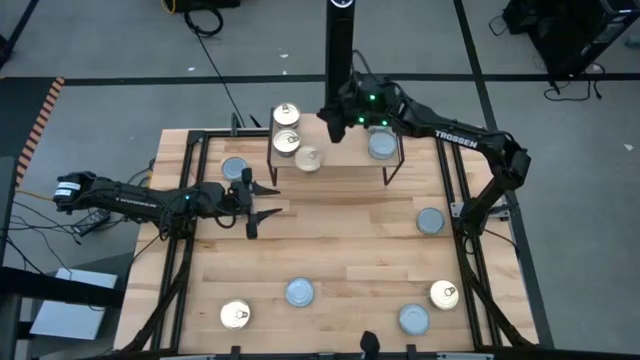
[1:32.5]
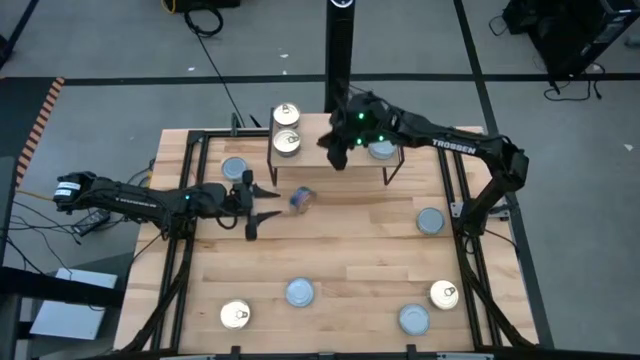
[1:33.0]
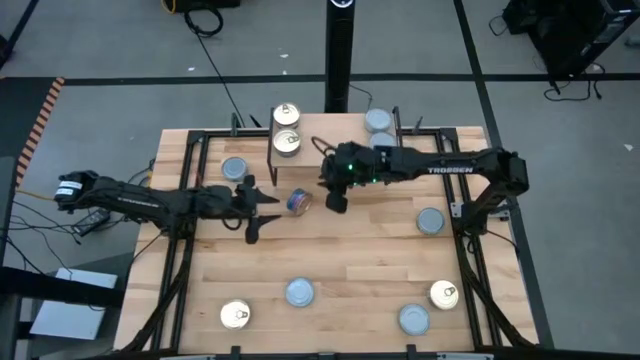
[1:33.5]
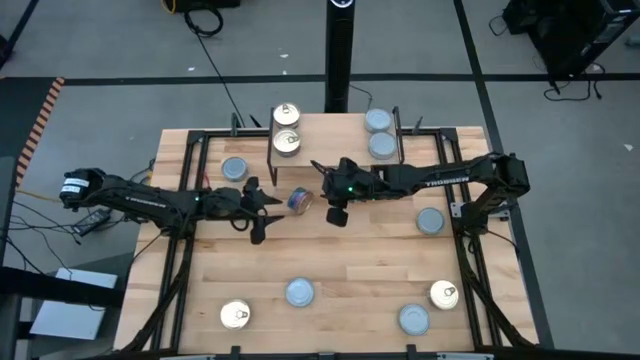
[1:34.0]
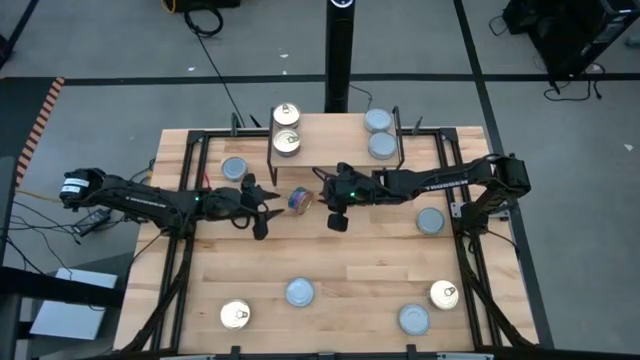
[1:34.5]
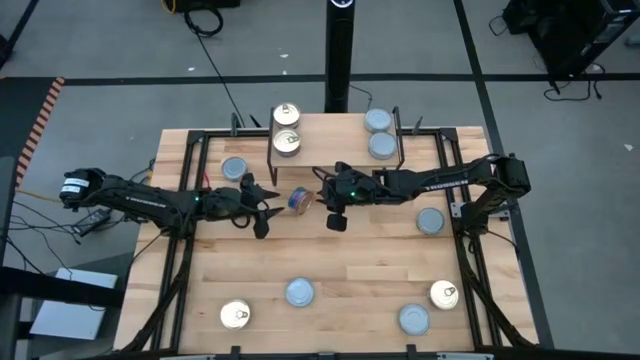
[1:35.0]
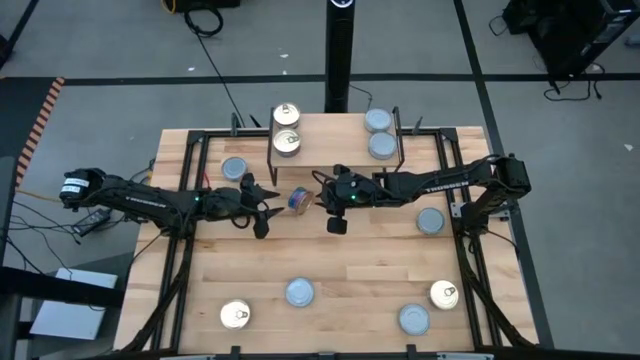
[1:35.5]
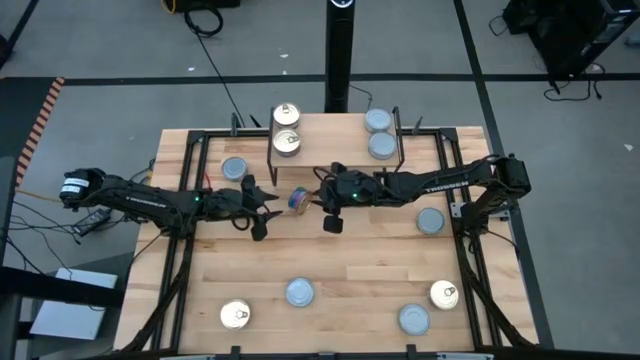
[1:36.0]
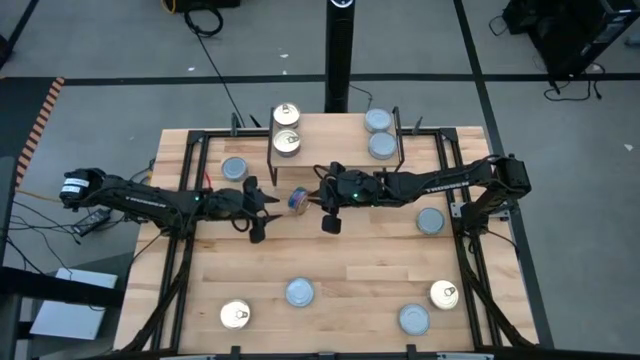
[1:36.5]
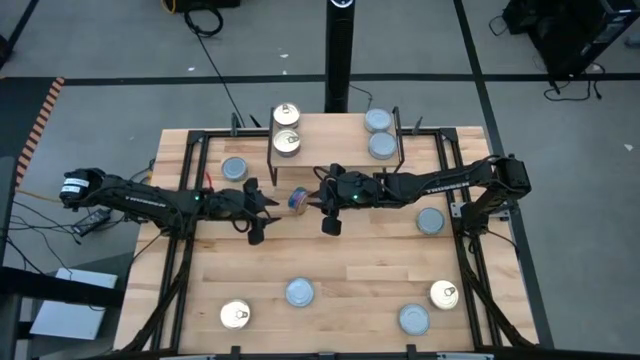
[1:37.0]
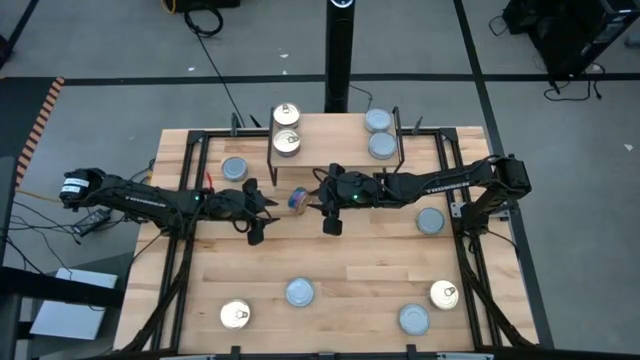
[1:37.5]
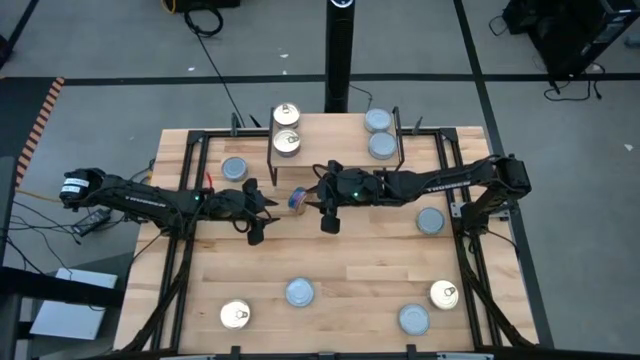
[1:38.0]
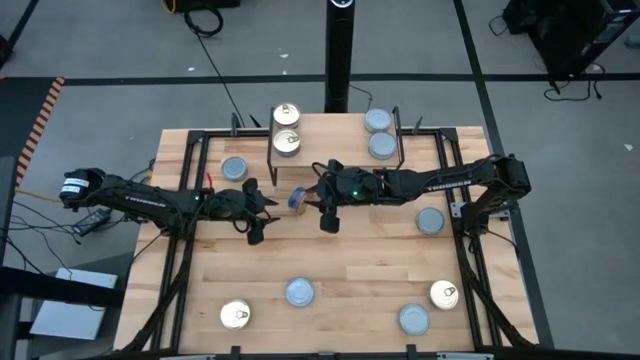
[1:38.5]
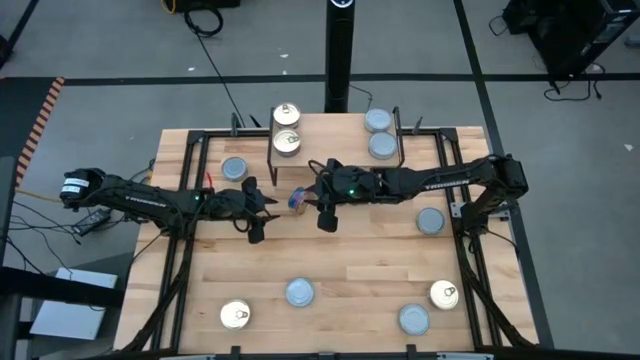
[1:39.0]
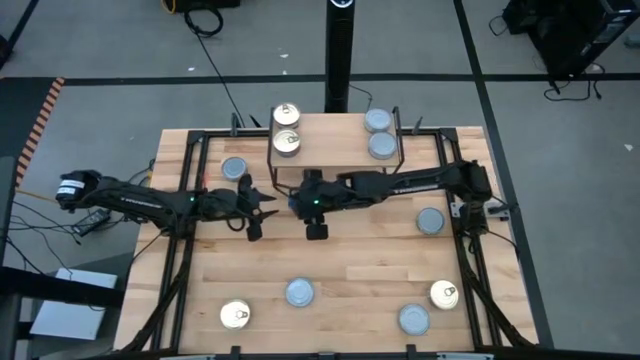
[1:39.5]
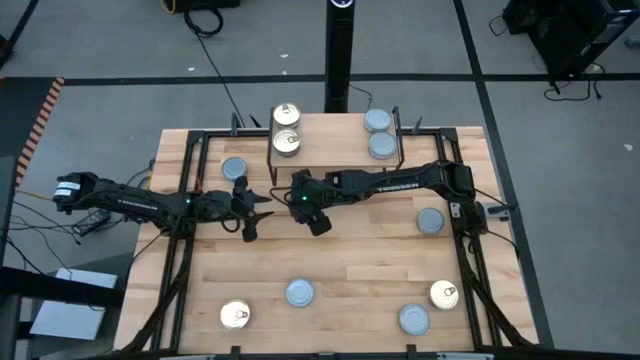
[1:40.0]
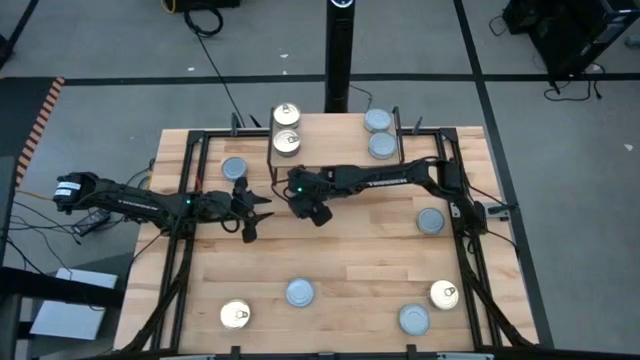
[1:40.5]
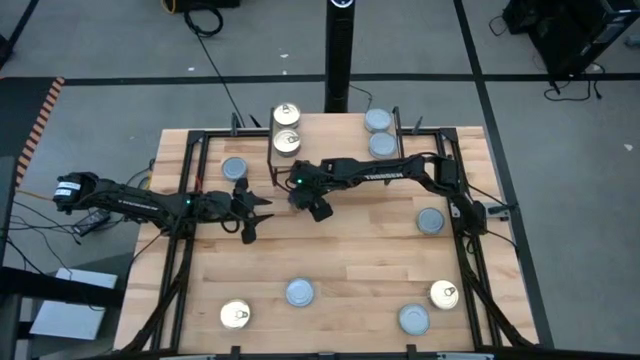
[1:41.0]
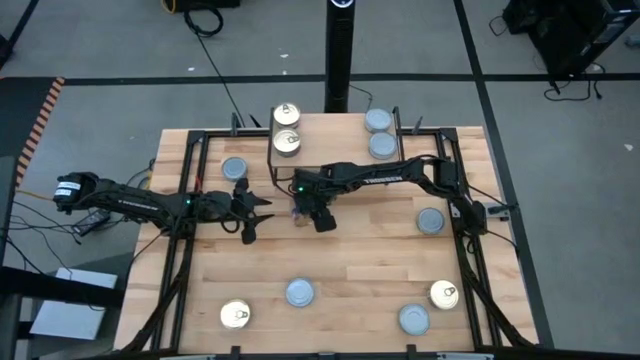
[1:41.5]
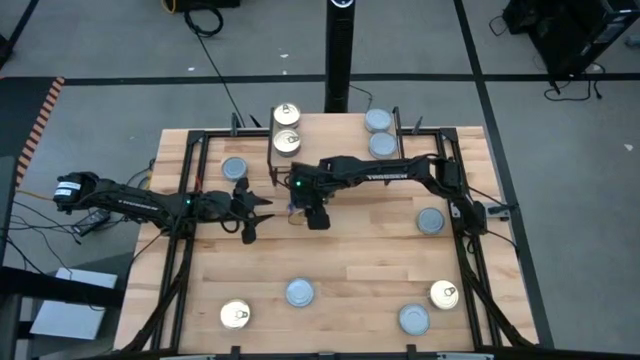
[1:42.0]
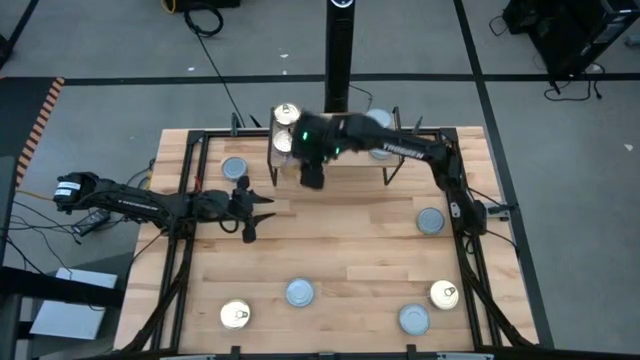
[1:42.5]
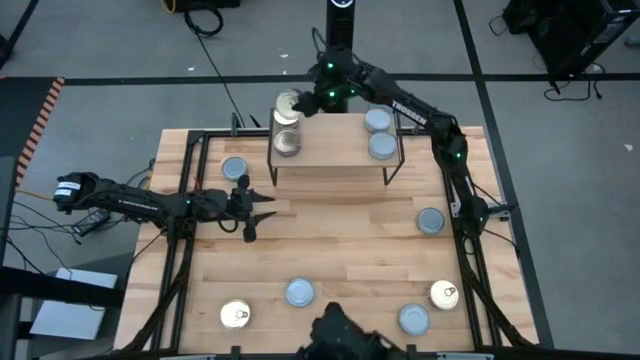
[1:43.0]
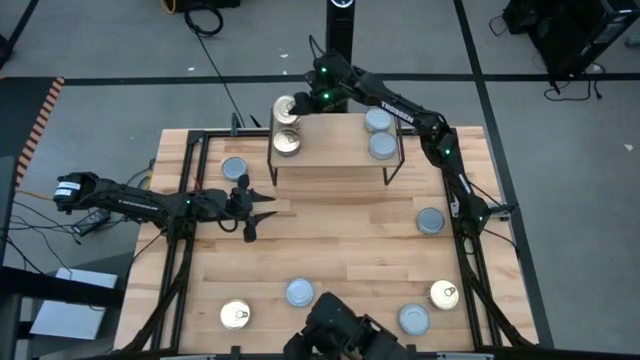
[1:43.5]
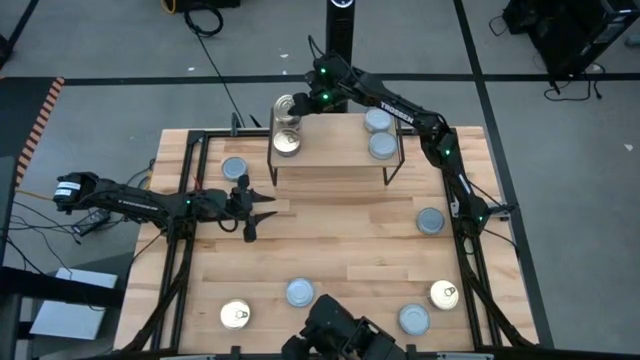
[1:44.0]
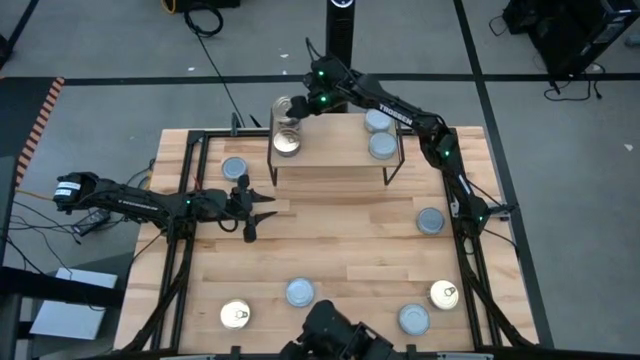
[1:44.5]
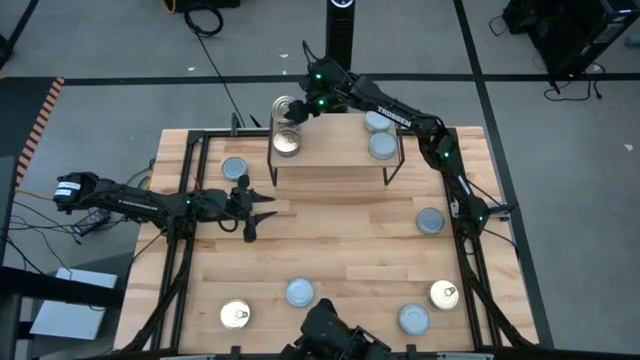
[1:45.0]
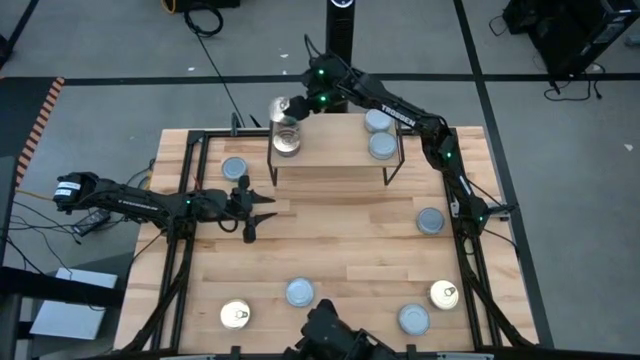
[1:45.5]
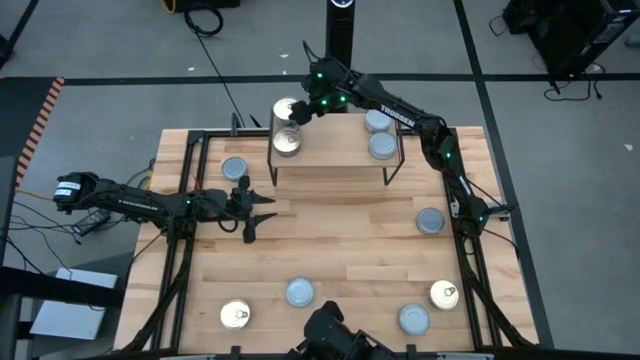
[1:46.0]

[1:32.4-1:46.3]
Task: Stack canned seafood by type on shelf
Stack the blue pink tuna can on the top blue tuna can on the shelf

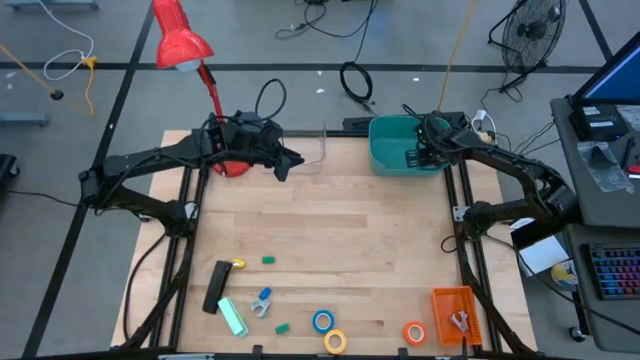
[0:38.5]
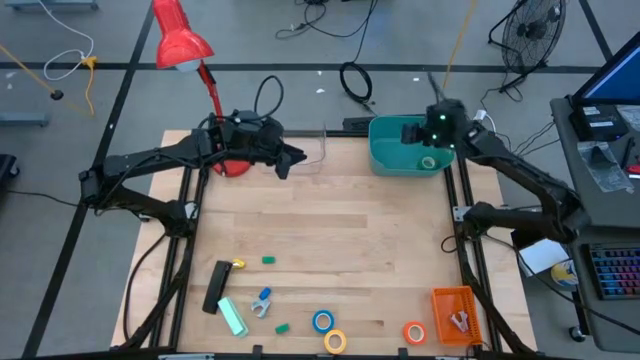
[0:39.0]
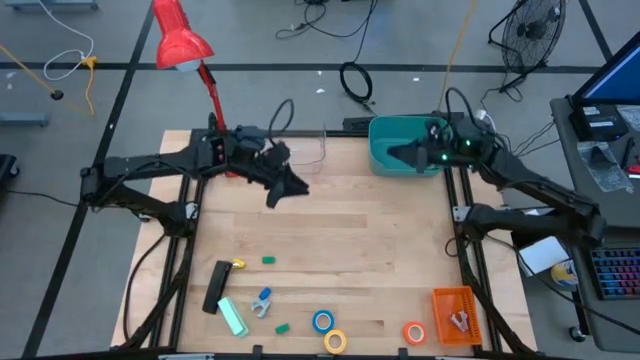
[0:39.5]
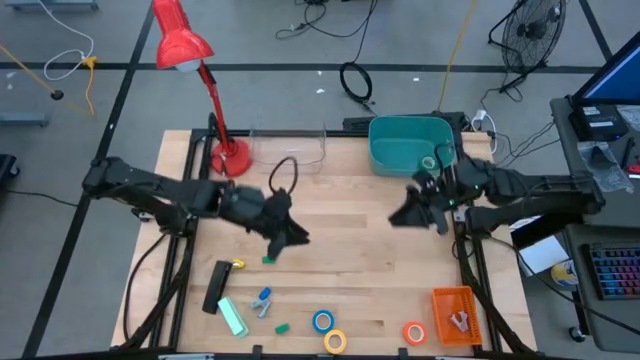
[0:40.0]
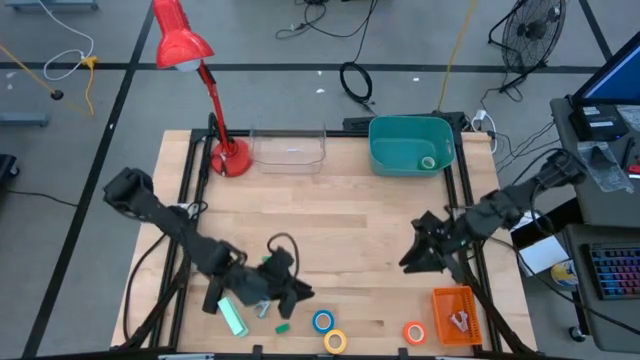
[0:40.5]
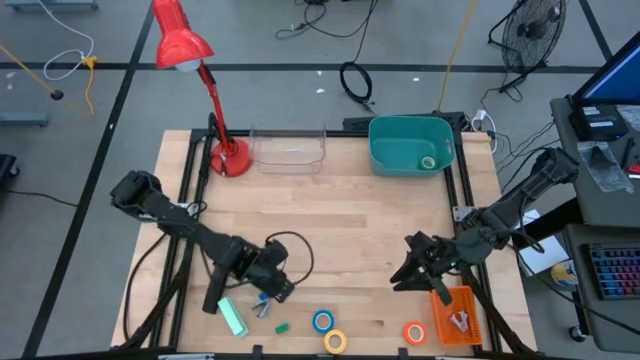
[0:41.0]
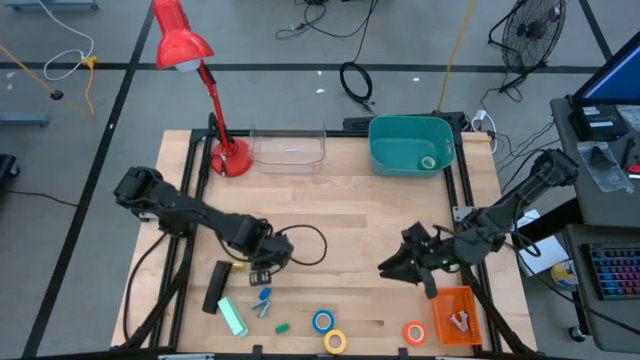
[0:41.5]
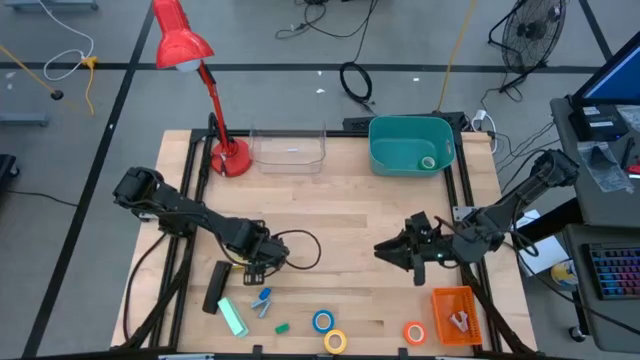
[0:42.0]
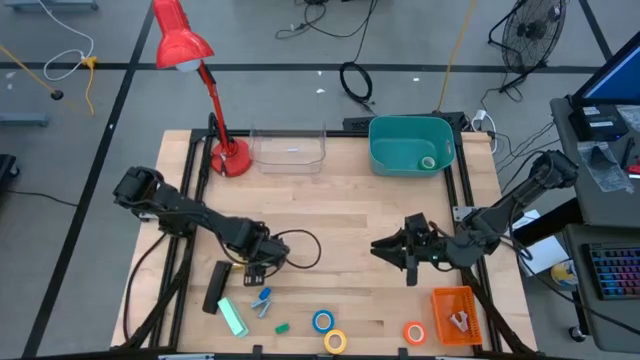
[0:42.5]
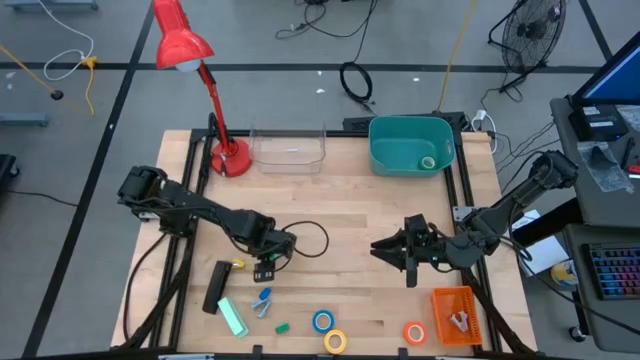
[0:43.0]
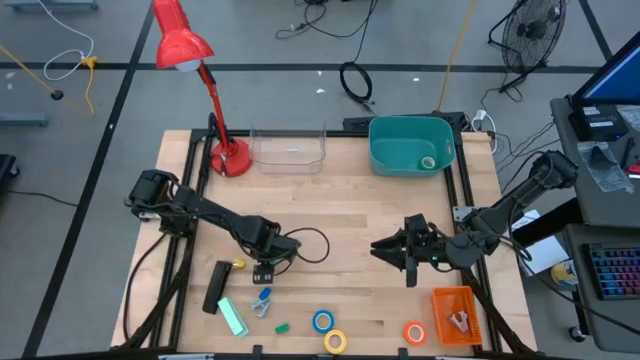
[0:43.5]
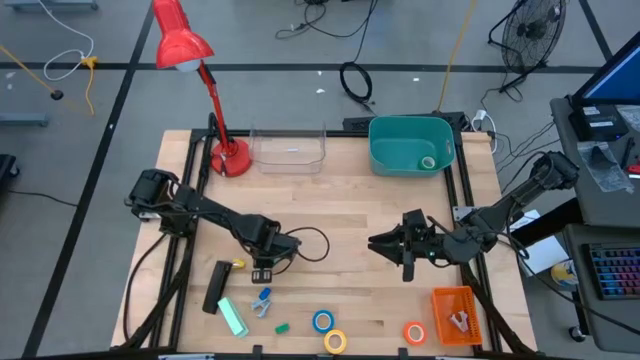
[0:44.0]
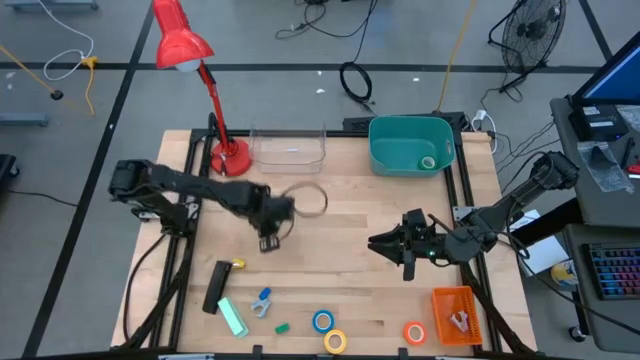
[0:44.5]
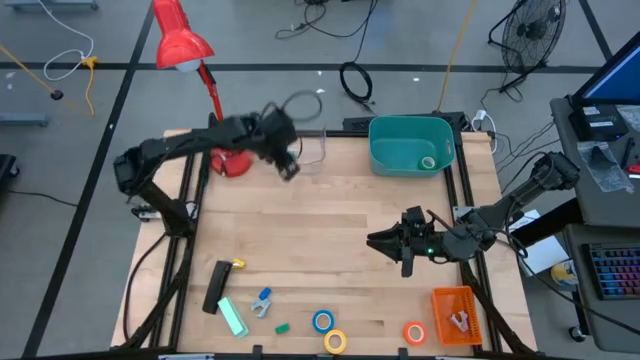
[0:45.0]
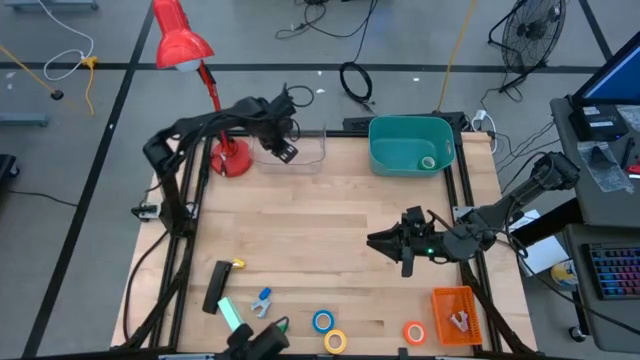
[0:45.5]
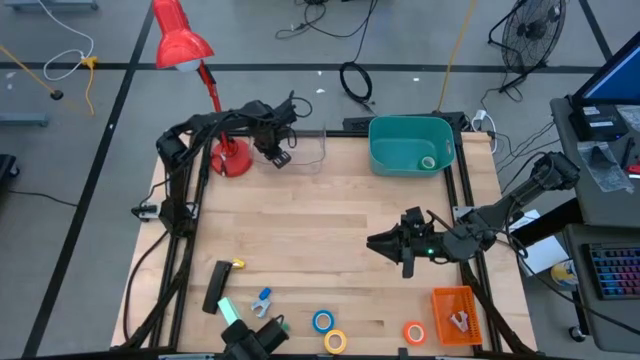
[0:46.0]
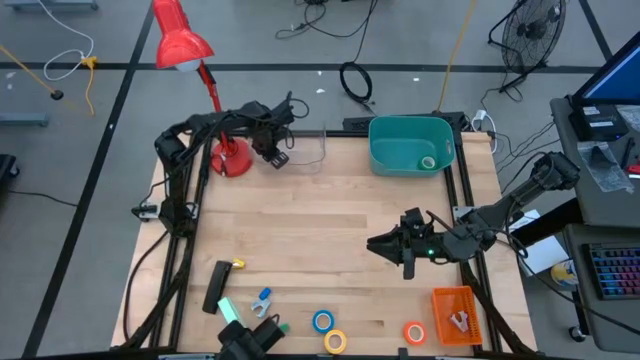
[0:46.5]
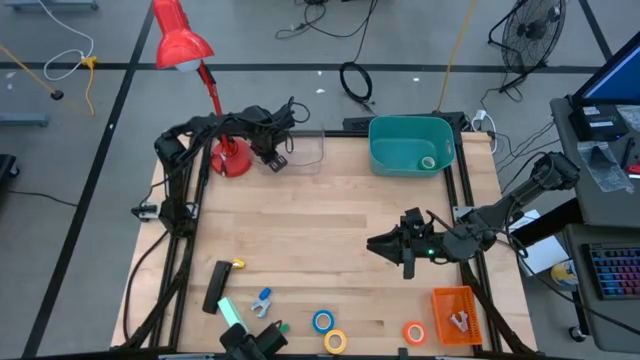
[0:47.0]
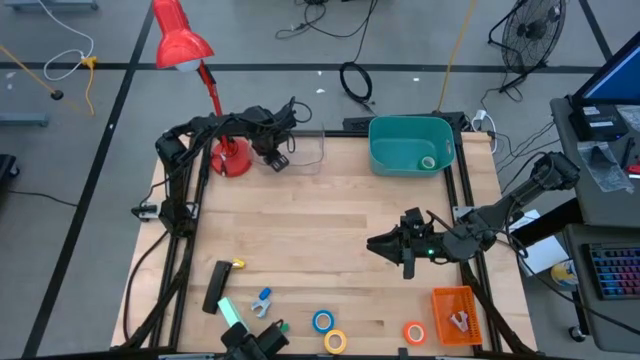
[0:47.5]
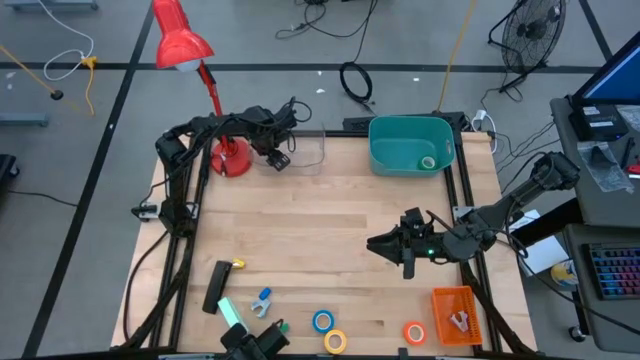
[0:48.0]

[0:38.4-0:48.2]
Task: Pick and place Stapler, Stapler remover, tape
Put the small green stapler into the transparent bin
